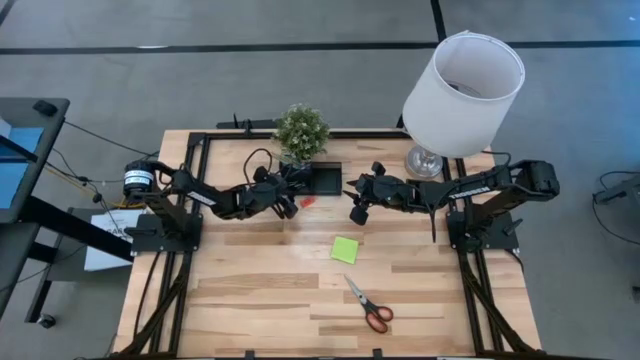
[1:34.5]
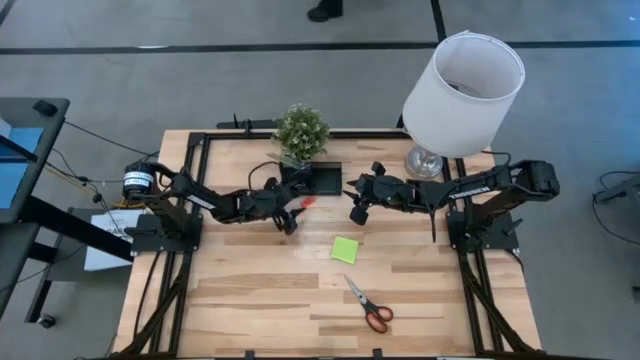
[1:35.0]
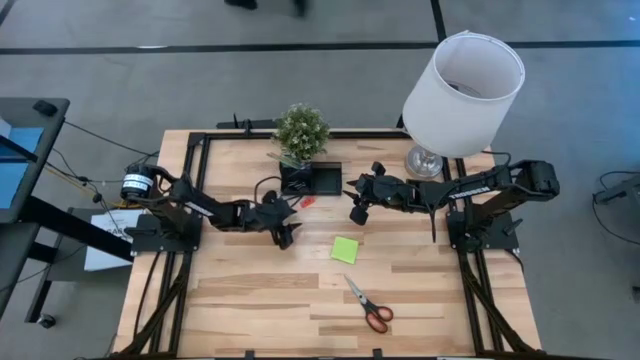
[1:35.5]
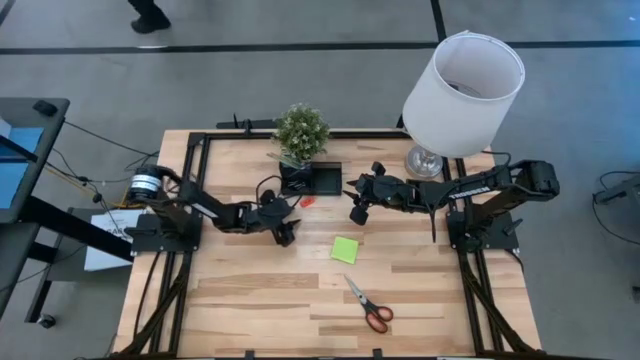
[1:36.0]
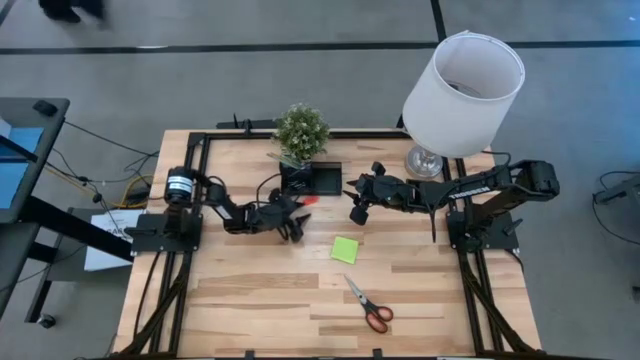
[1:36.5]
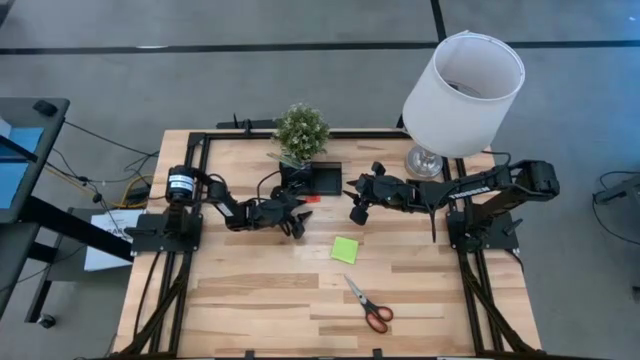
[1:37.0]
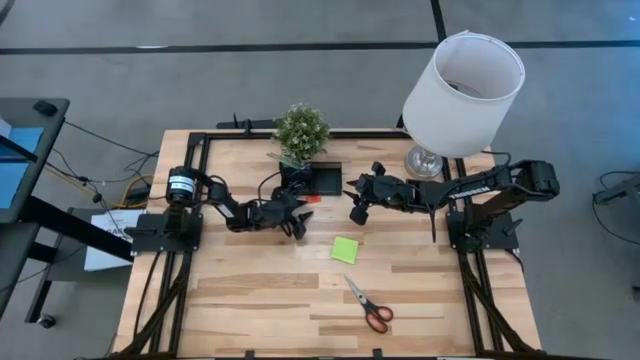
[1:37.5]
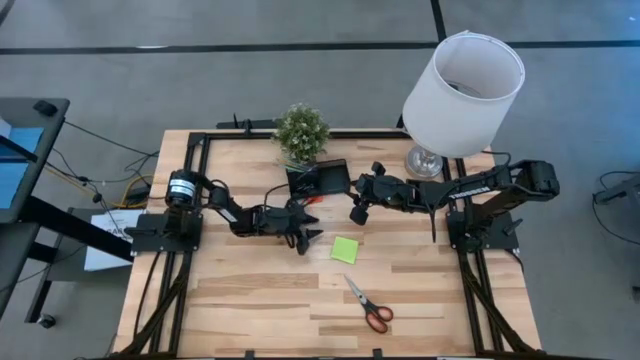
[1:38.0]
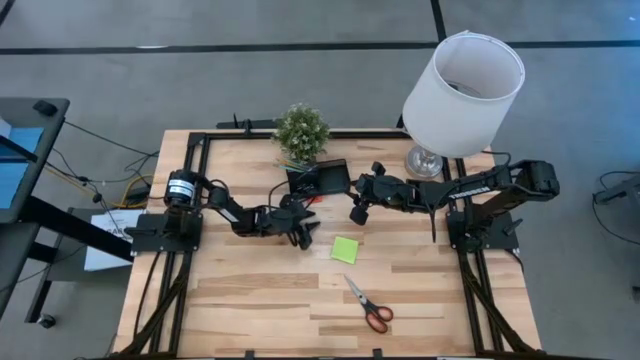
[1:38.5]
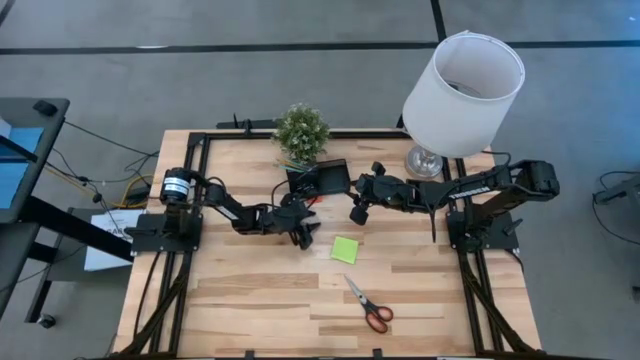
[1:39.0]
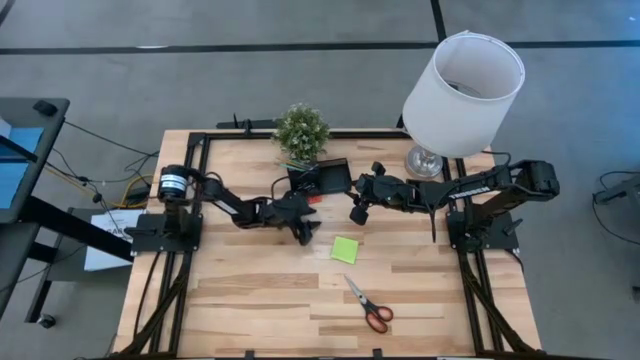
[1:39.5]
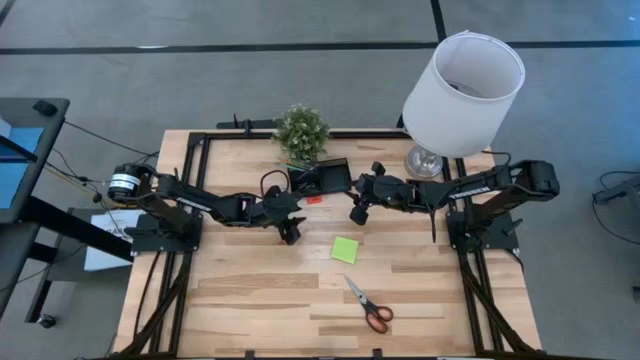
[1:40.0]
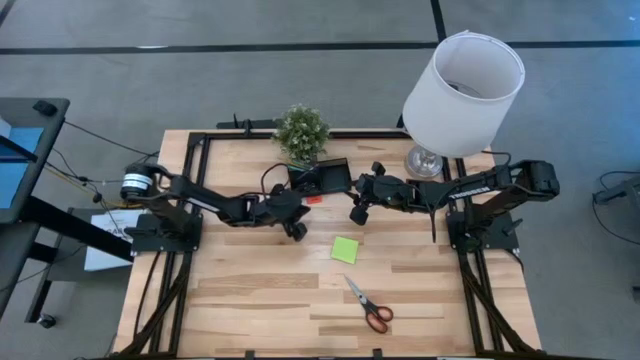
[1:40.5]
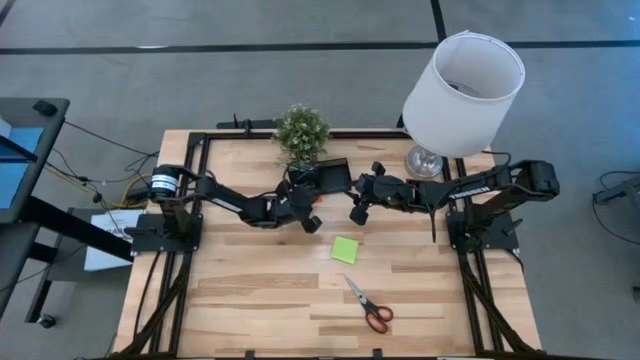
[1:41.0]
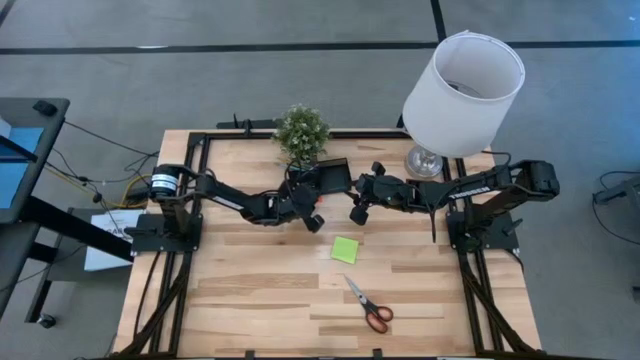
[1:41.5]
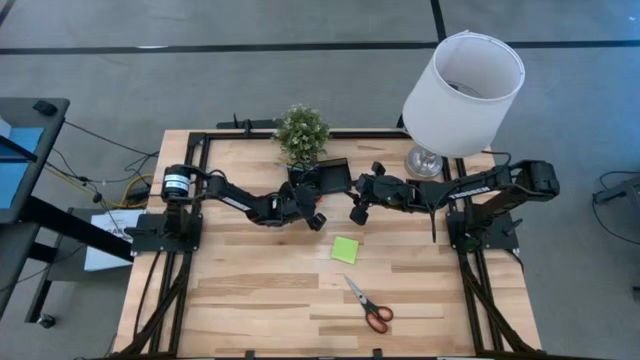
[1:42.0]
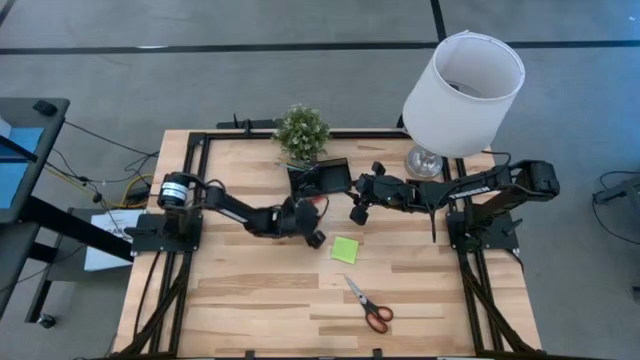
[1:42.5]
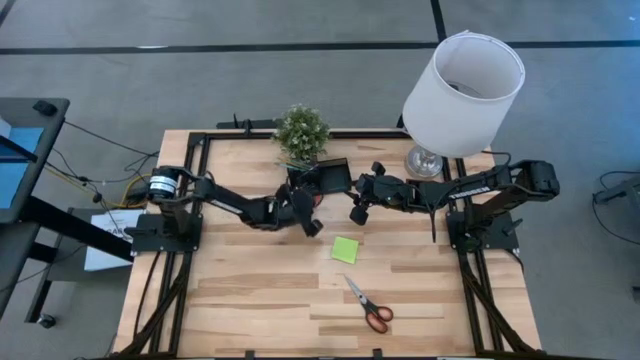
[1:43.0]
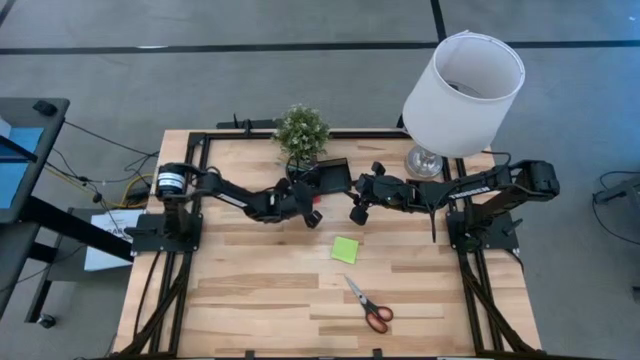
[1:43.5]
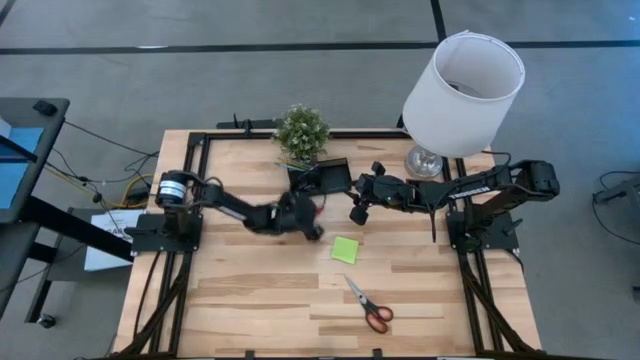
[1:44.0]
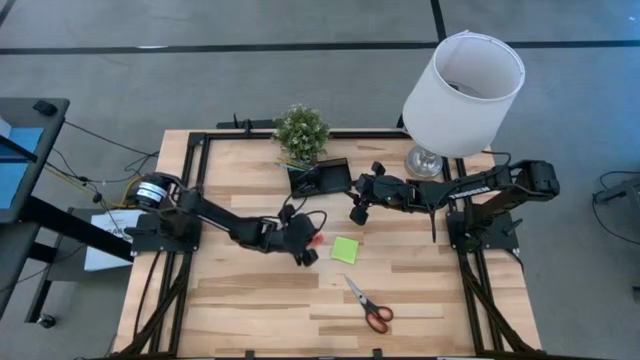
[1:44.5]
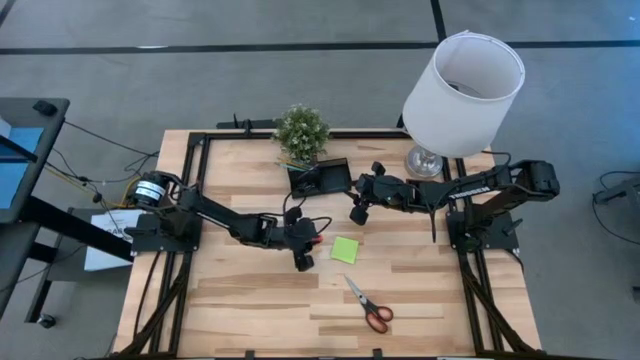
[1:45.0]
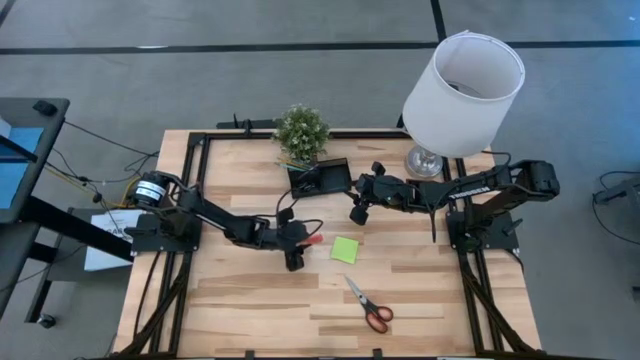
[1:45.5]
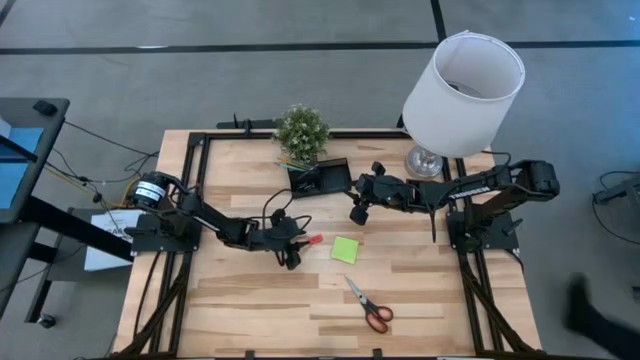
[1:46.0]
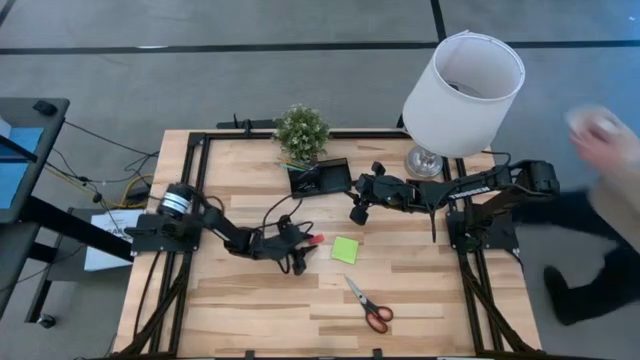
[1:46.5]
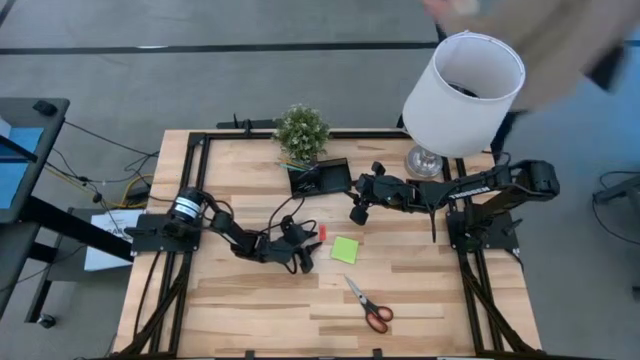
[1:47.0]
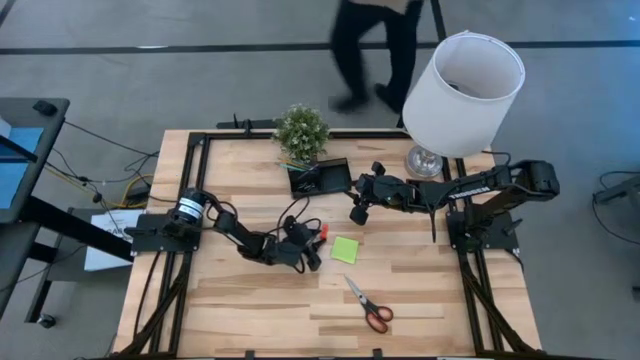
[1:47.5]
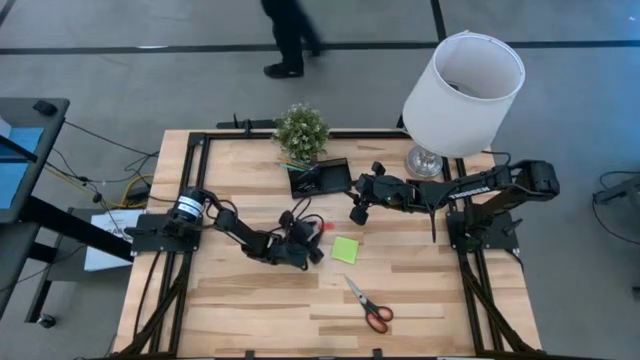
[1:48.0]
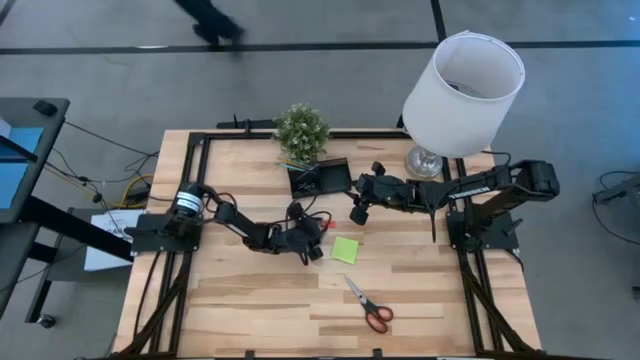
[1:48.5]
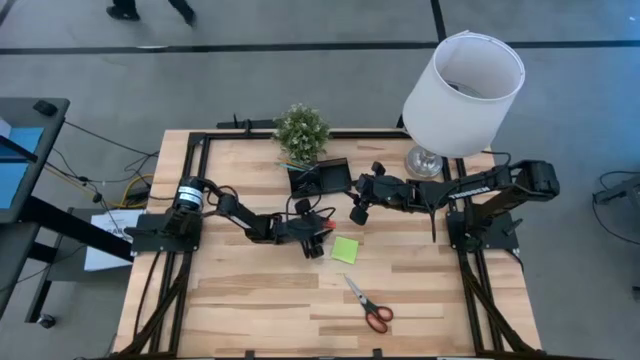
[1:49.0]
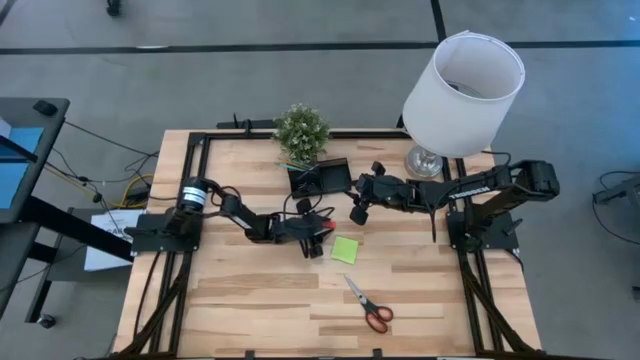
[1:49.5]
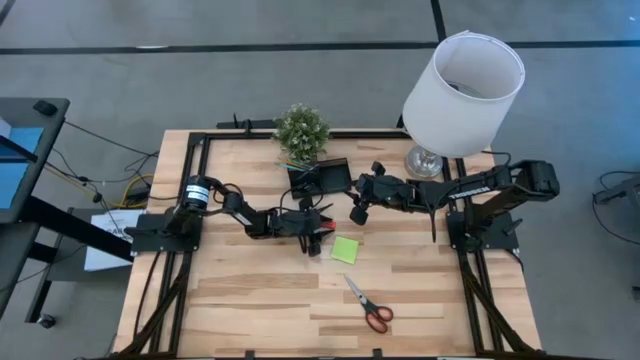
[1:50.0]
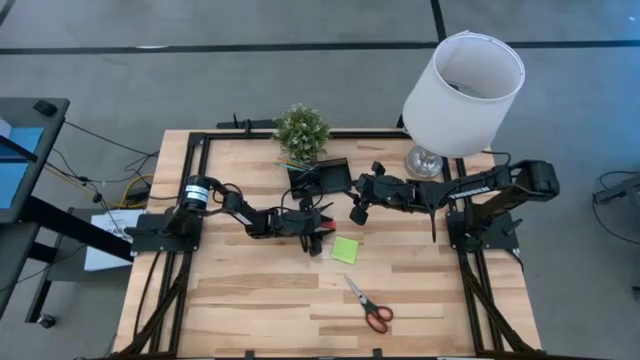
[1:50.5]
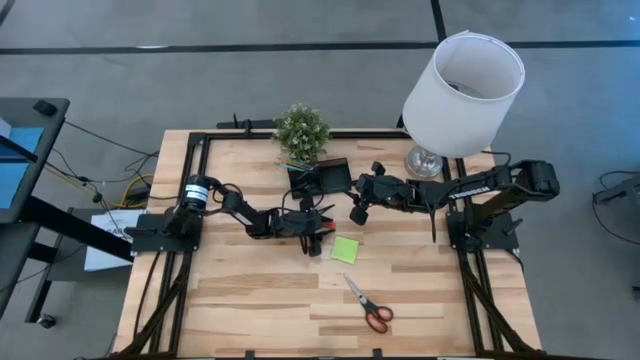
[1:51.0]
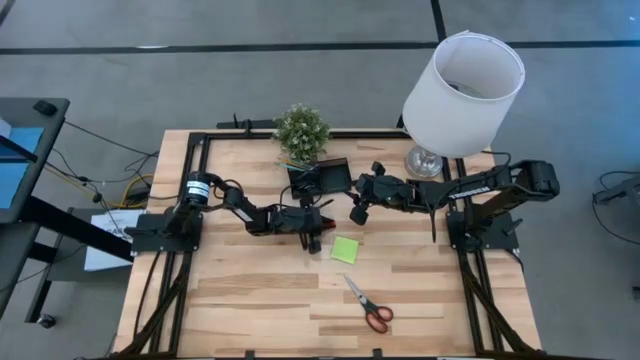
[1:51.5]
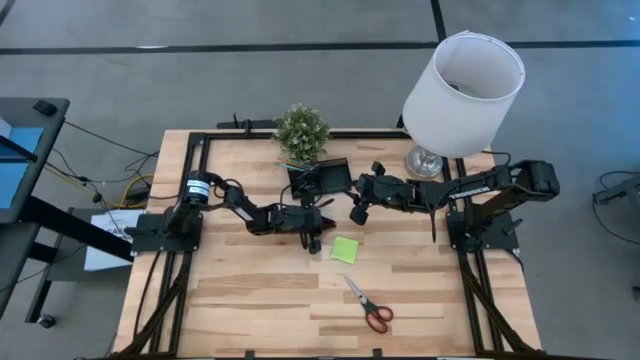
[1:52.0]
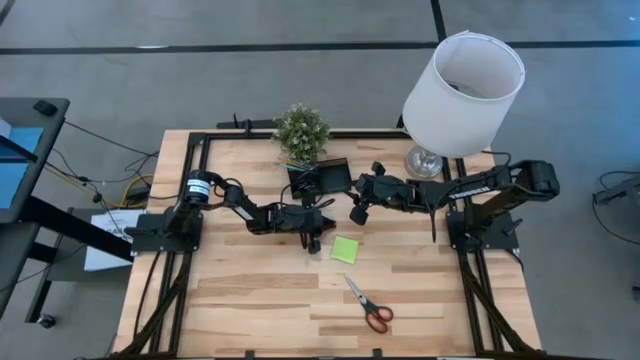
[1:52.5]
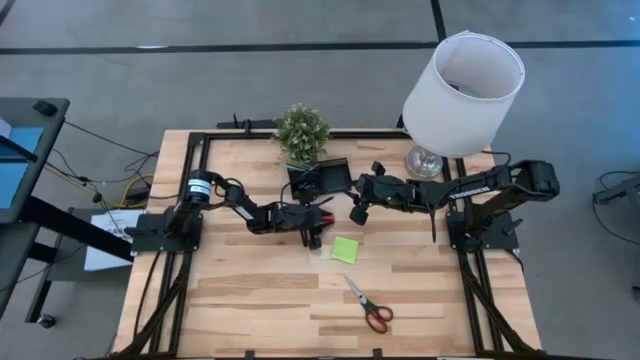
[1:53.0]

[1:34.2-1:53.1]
Task: Pick and place office supplies into organizer
Put the orange eraser into the black organizer

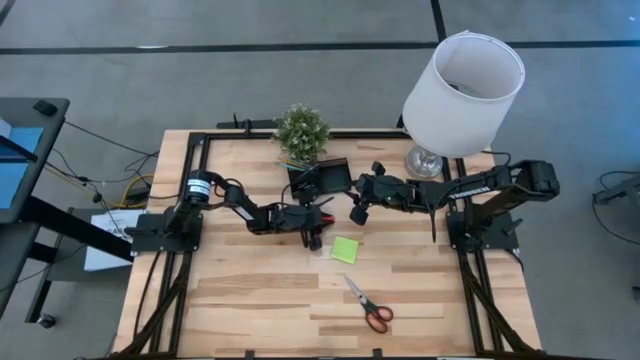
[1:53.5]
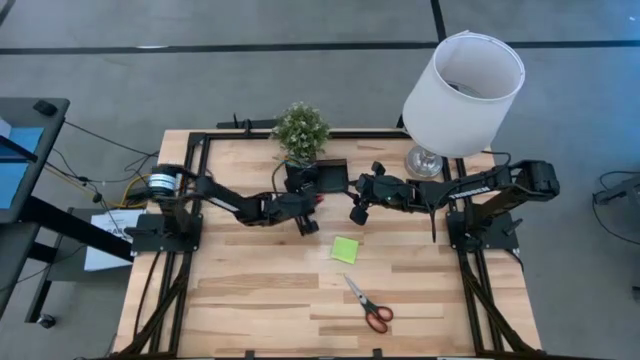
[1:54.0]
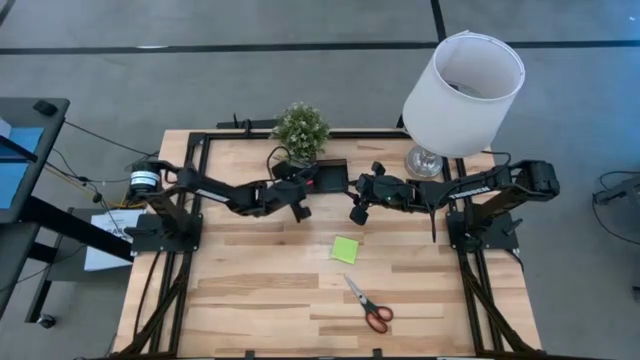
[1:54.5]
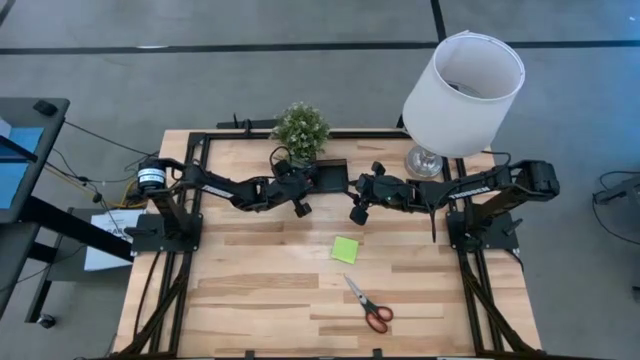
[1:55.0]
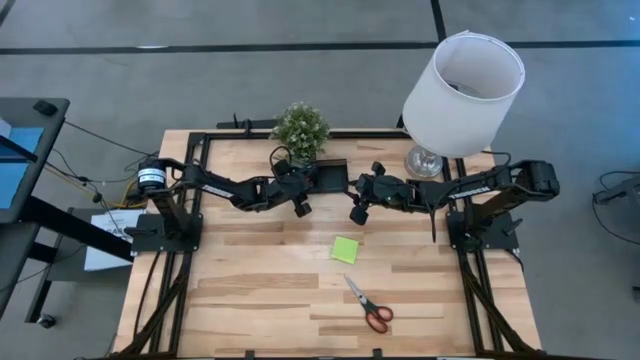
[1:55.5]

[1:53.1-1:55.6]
Put the orange eraser into the black organizer
